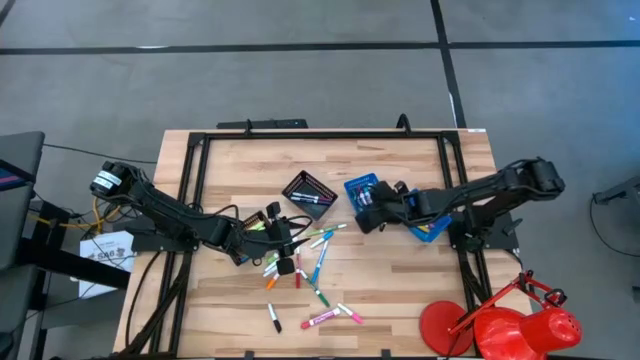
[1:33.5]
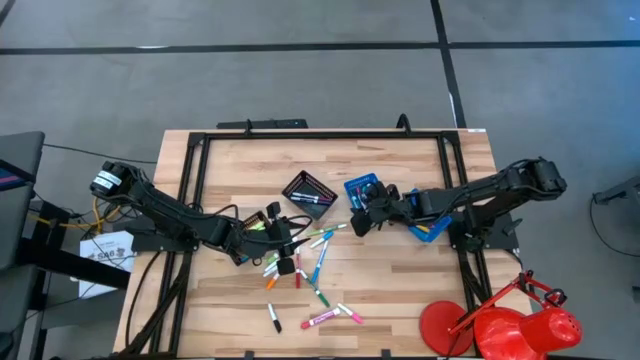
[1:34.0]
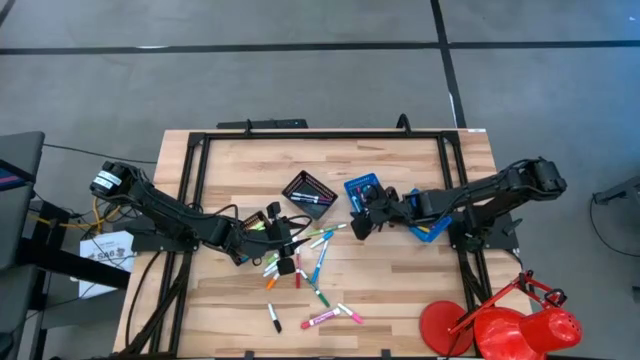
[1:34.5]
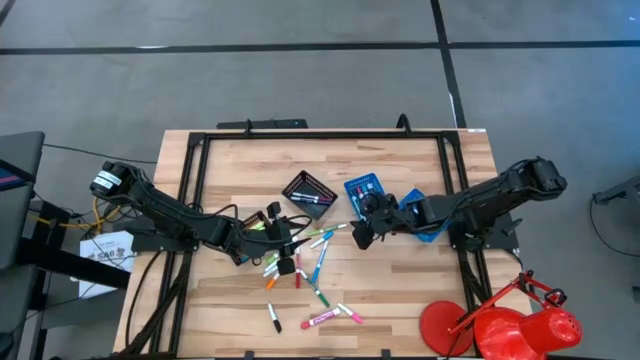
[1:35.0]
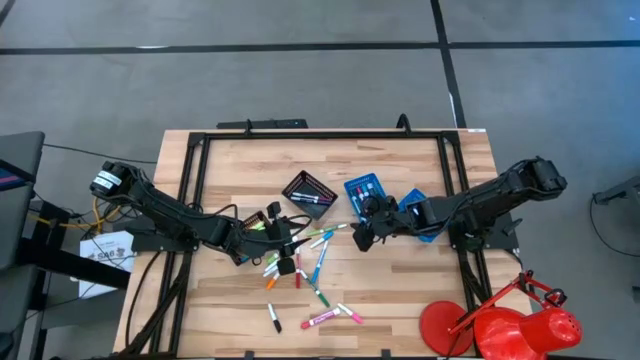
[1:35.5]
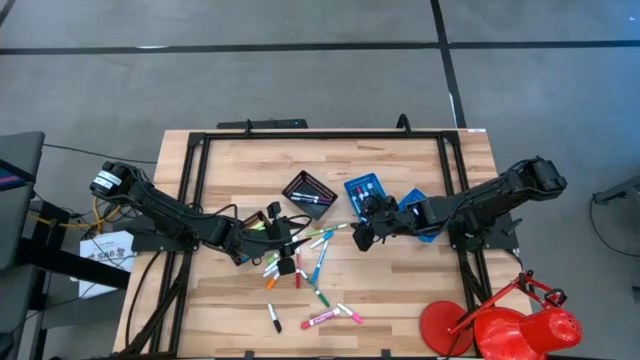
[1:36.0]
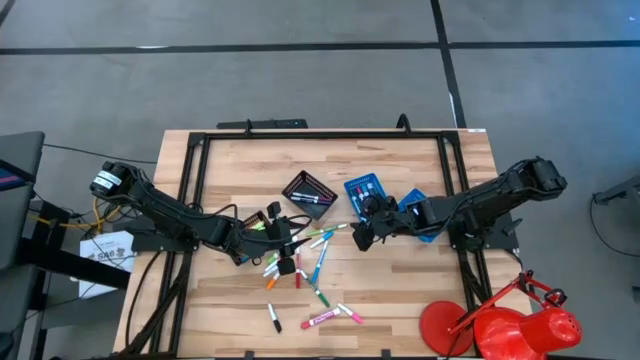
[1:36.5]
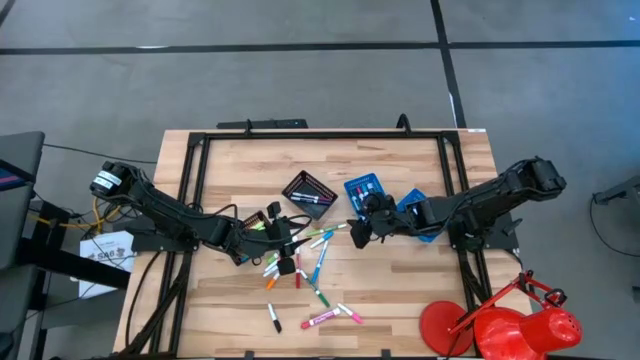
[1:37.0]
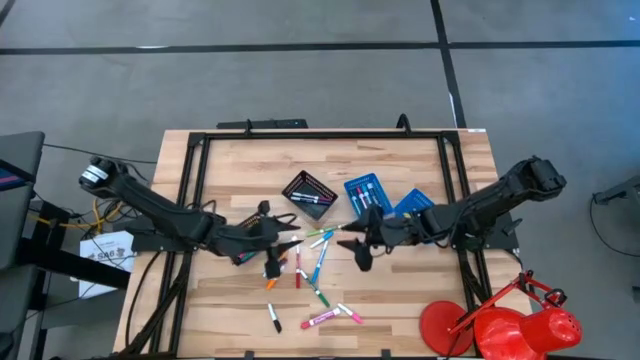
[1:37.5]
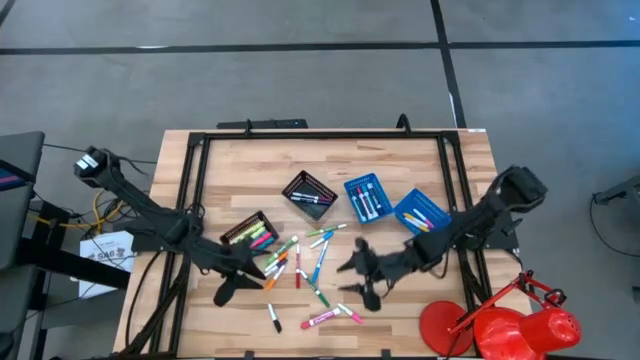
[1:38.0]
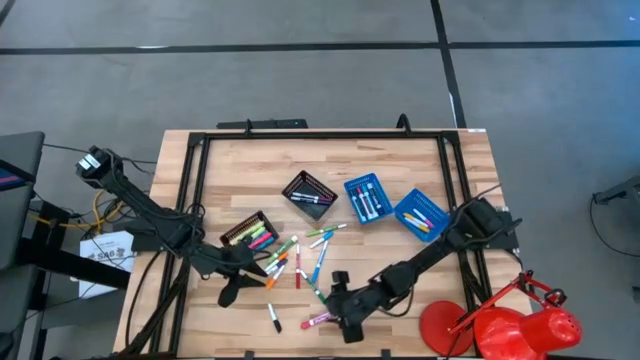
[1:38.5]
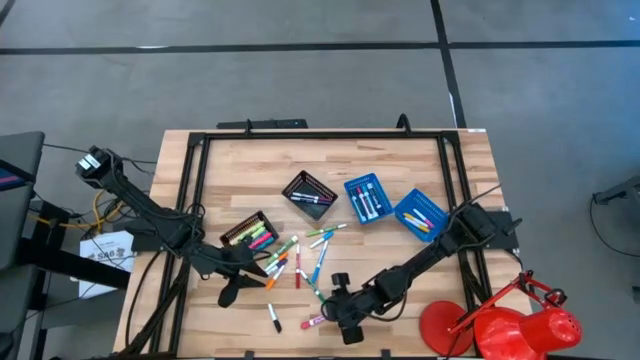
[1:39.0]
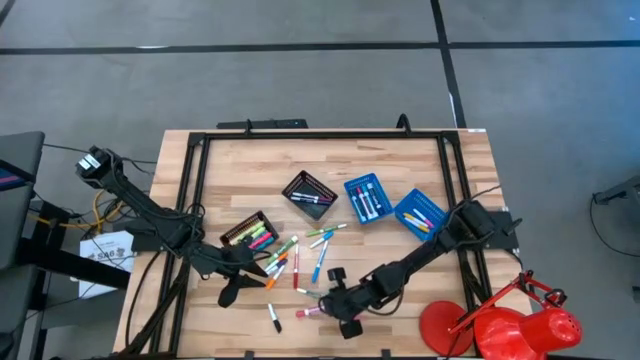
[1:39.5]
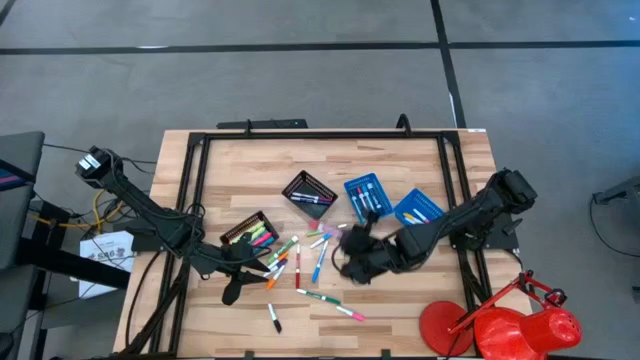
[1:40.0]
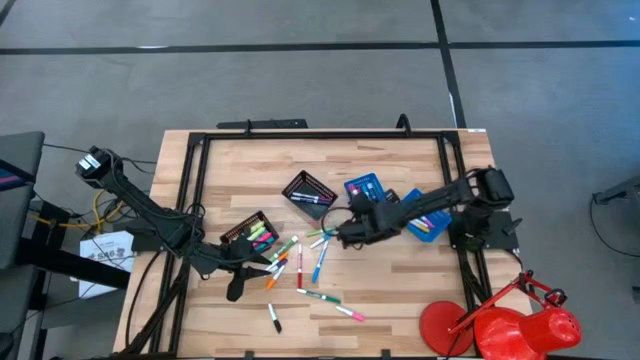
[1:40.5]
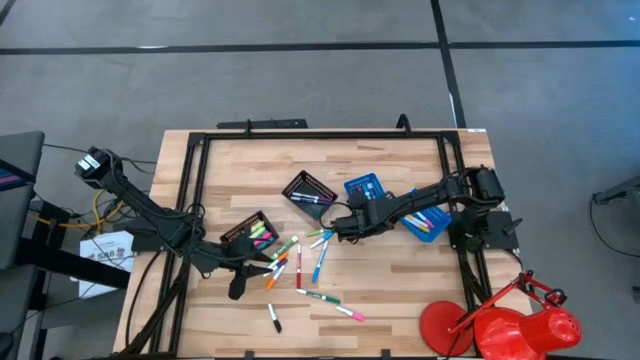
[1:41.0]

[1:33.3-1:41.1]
Task: Pick & Place Markers
Put the large pink marker into the left blue bin

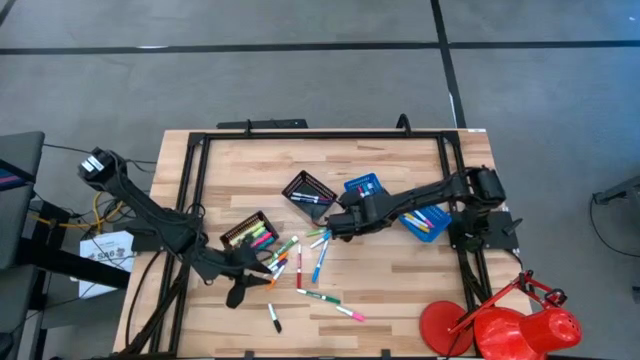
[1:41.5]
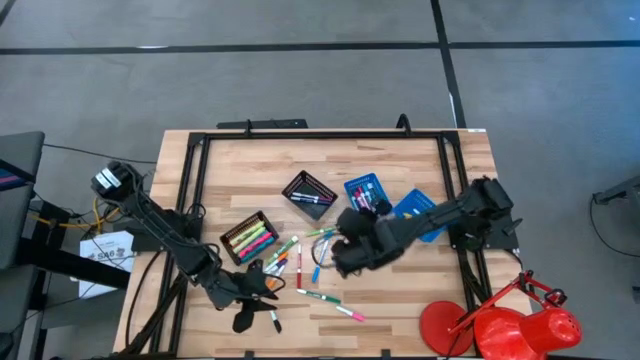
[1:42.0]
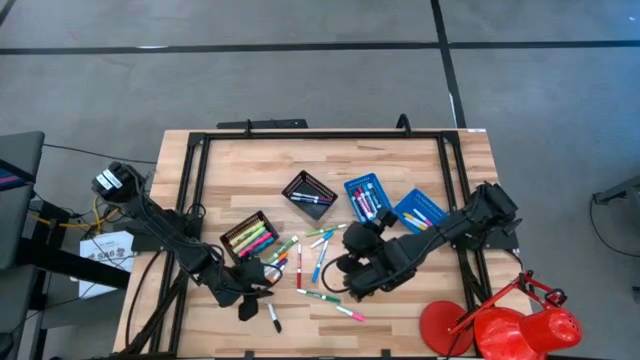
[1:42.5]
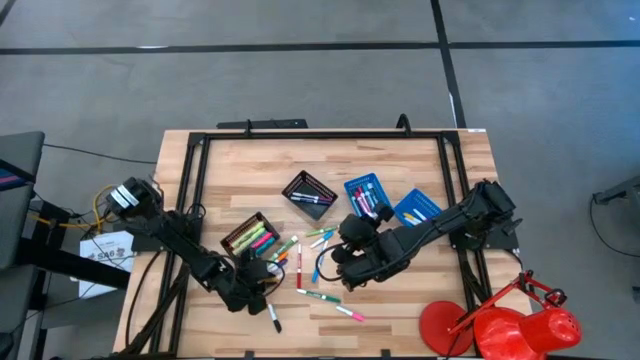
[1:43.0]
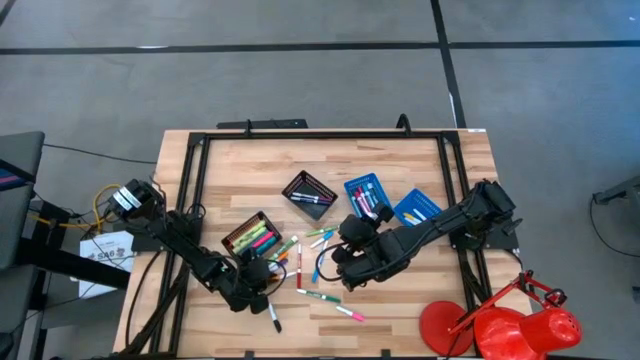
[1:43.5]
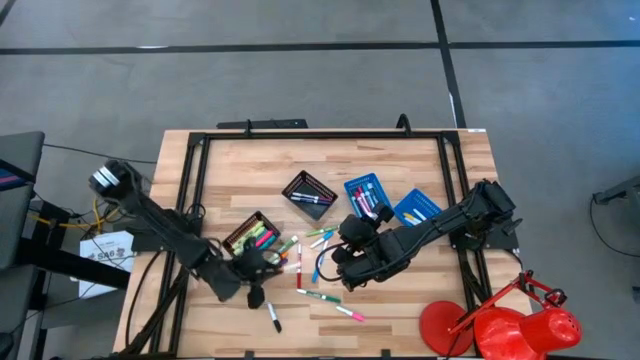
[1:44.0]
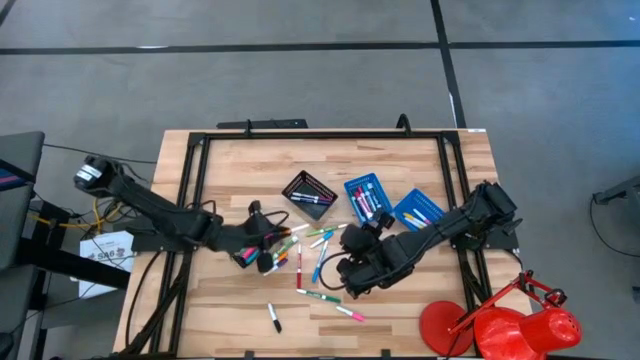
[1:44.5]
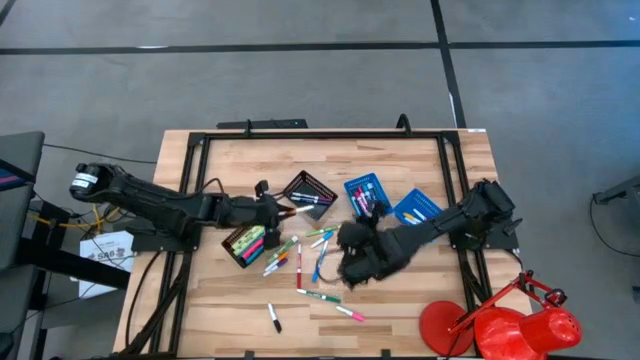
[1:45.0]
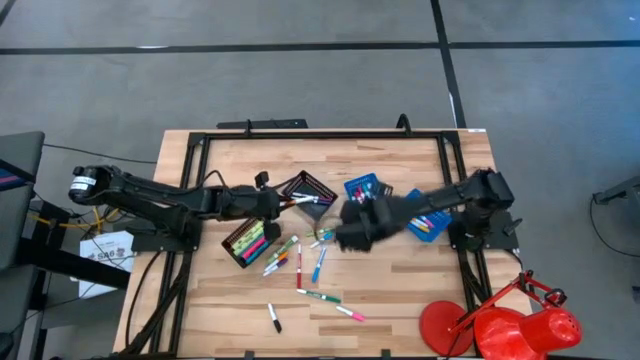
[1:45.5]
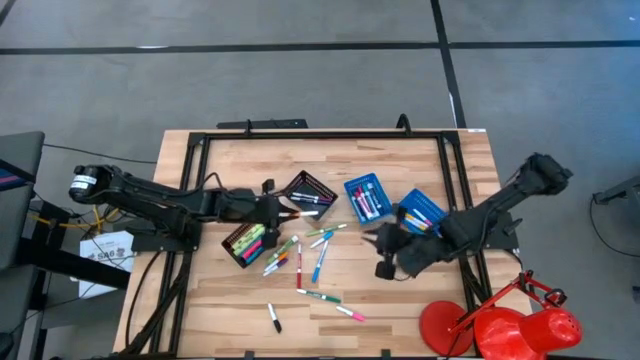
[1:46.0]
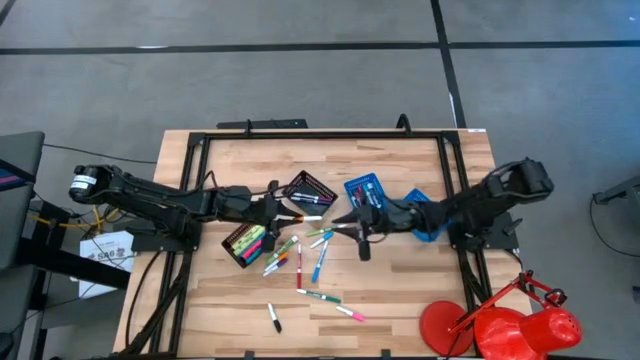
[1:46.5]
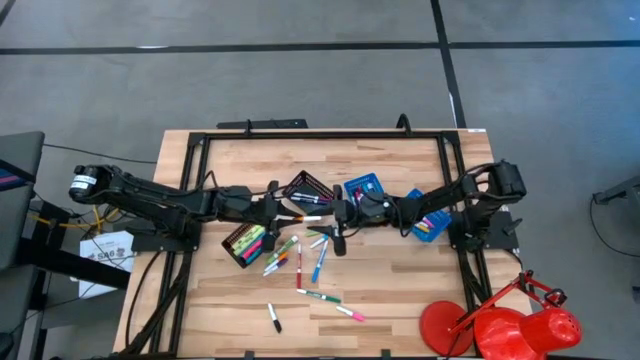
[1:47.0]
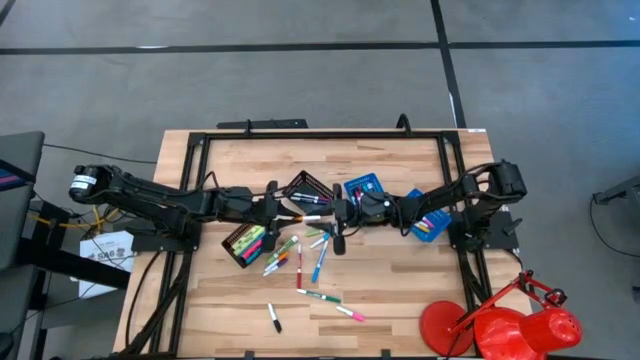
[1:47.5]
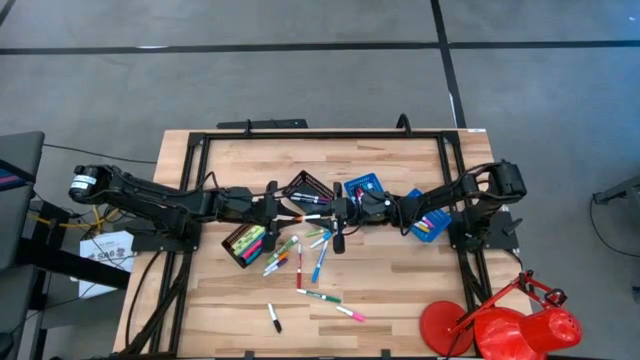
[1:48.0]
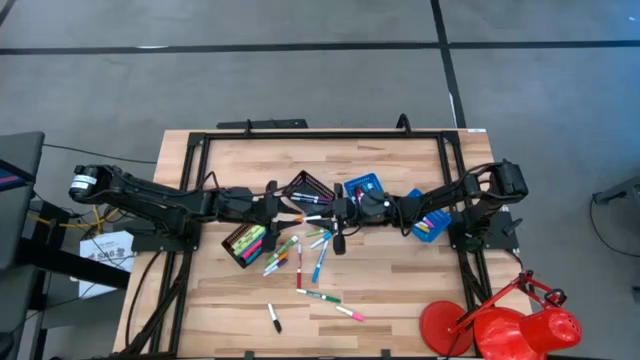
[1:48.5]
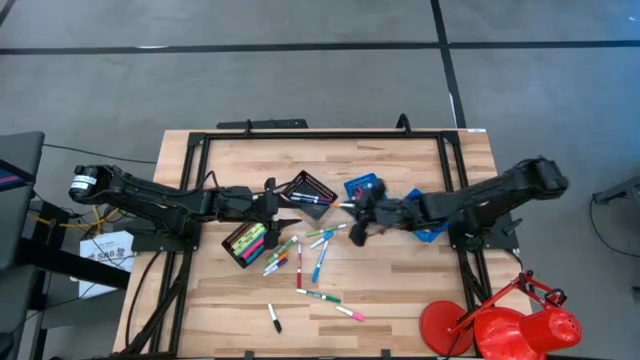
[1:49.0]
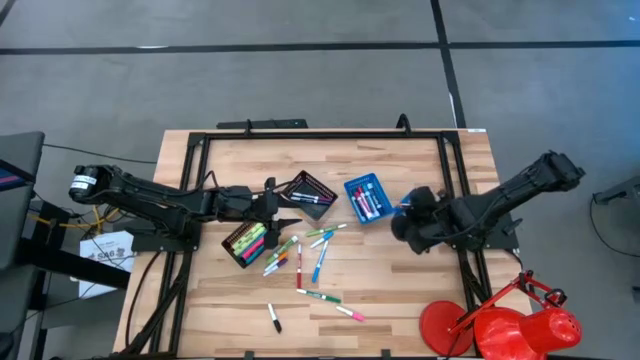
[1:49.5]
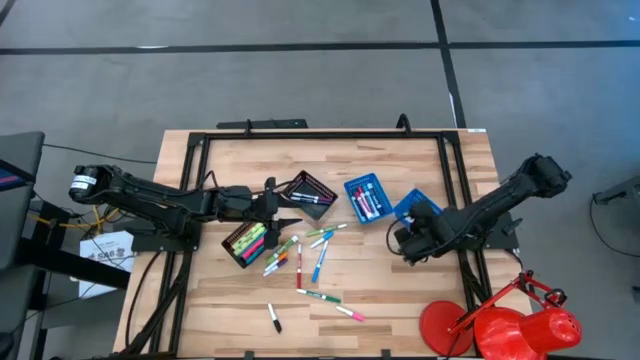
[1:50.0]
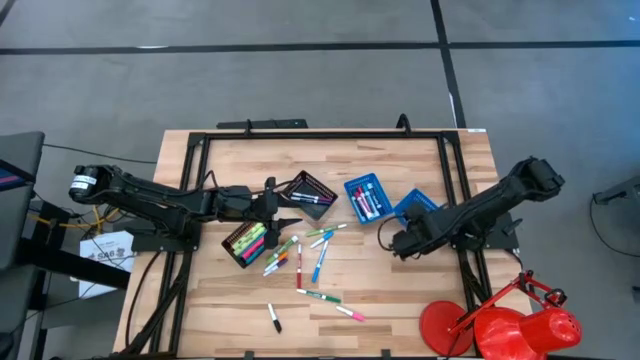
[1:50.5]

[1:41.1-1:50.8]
Put the bottom orange highlighter into the right blue bin

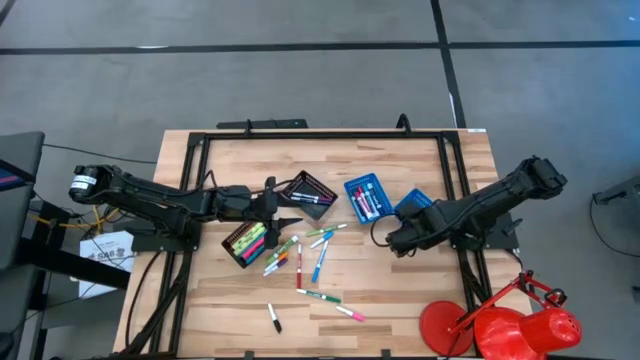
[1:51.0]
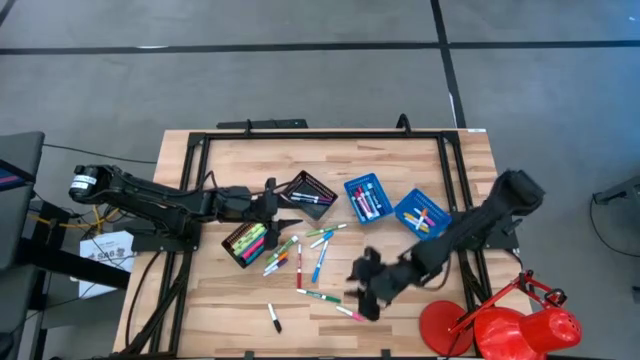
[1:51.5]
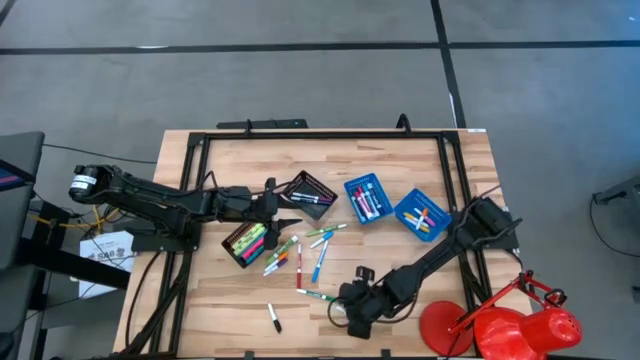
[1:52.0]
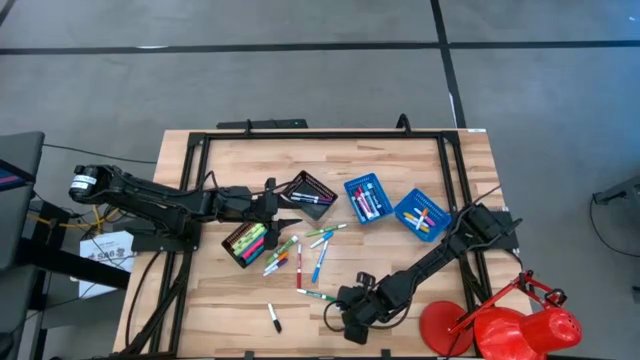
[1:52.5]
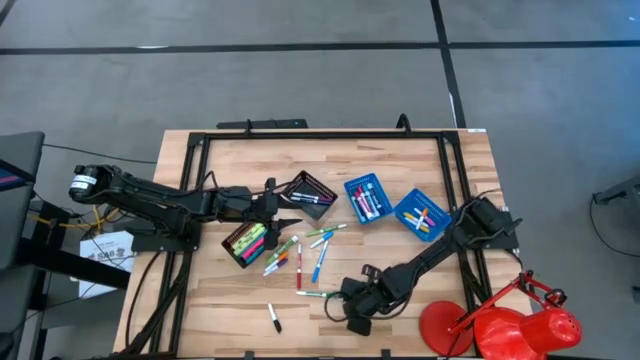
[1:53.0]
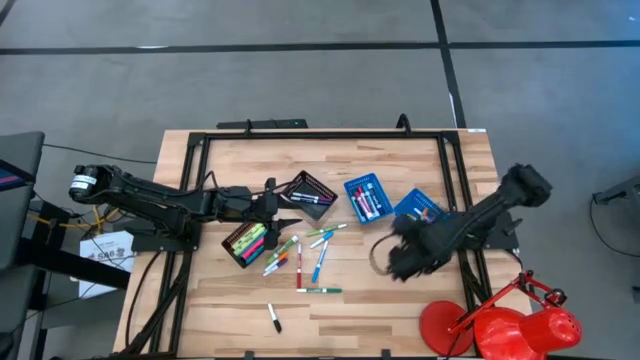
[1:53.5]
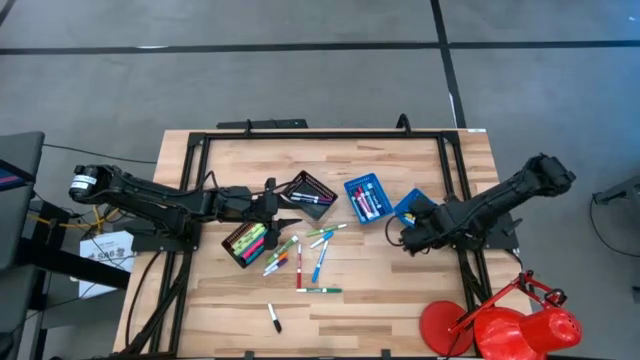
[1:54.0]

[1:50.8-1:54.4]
Put the pink highlighter into the right blue bin

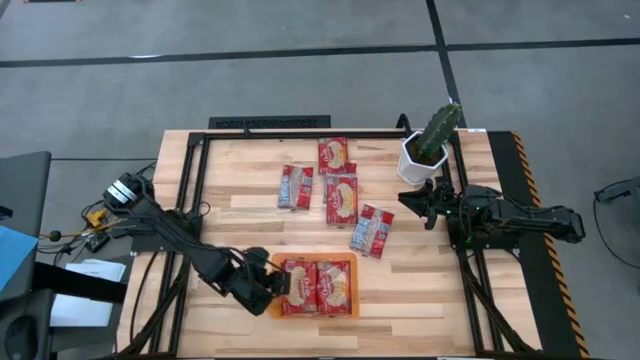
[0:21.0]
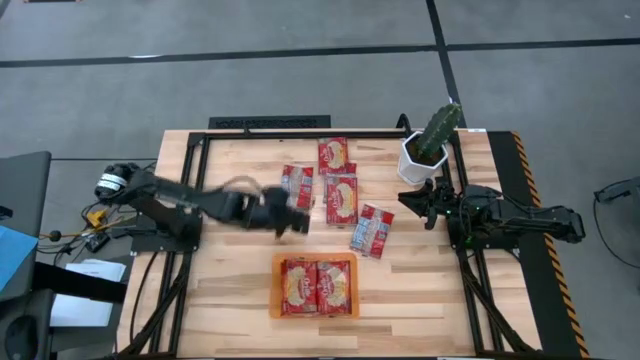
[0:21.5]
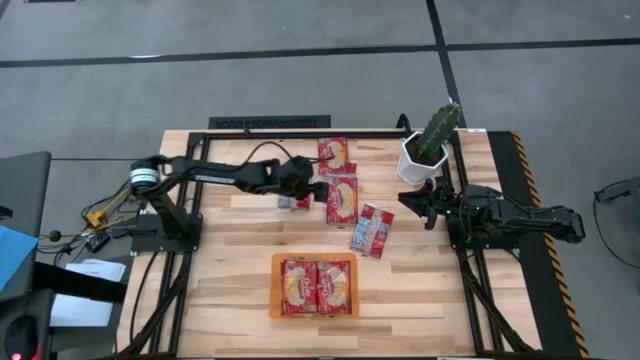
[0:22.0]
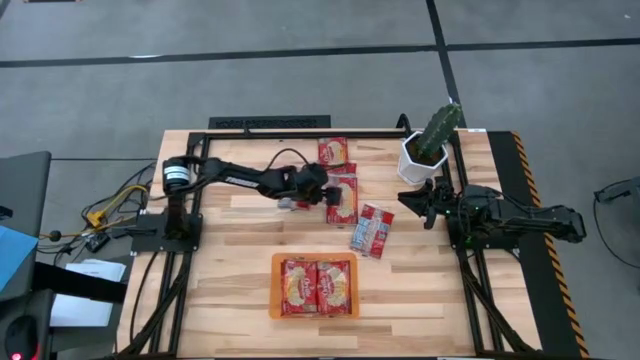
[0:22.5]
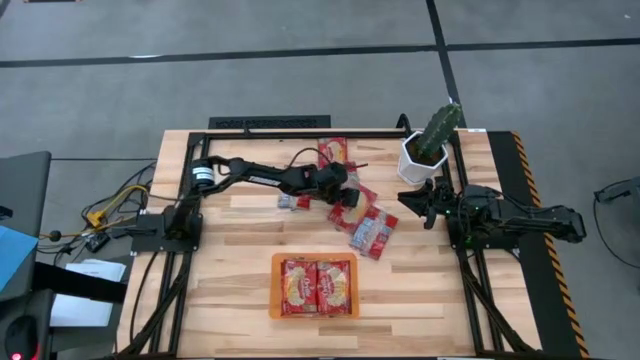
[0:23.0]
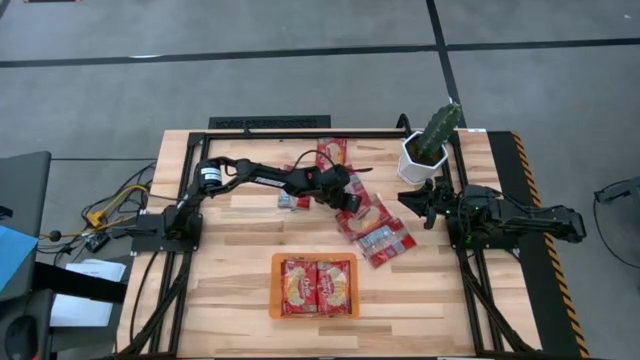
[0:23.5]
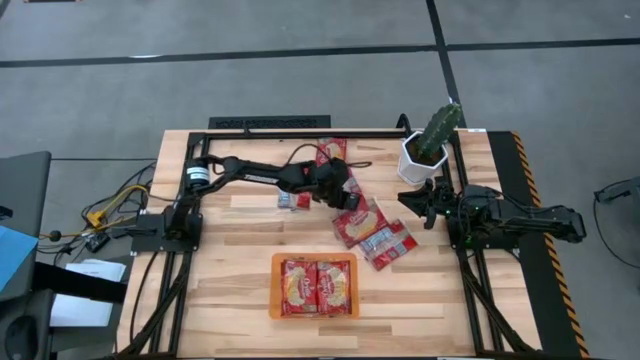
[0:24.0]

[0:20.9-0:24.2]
Task: Sort popcorn bags into baskets
Put the red popcorn bag into the orange bin
